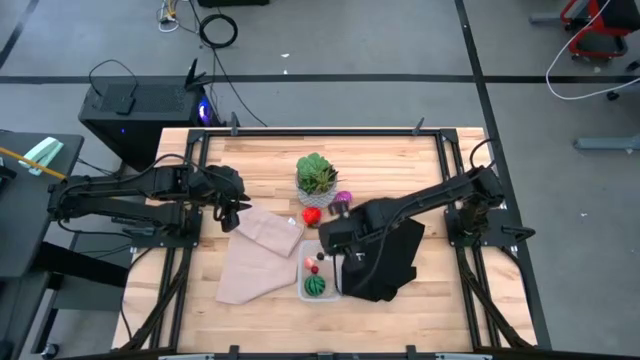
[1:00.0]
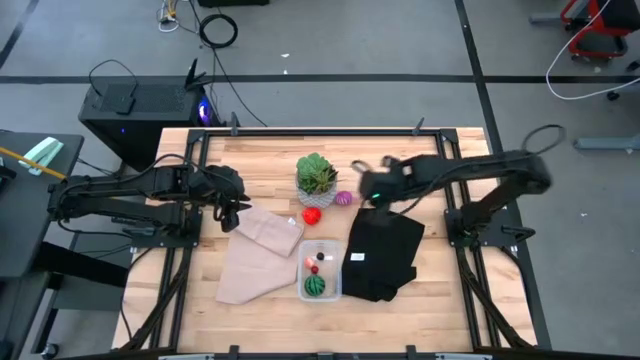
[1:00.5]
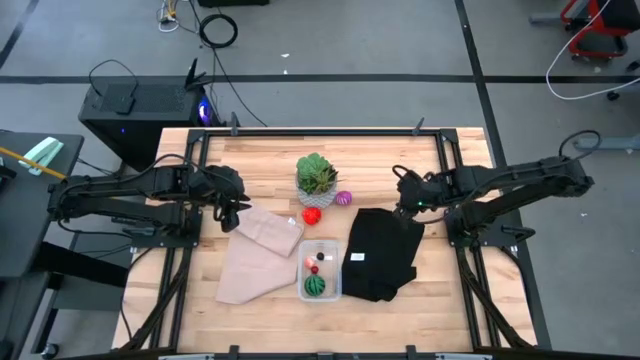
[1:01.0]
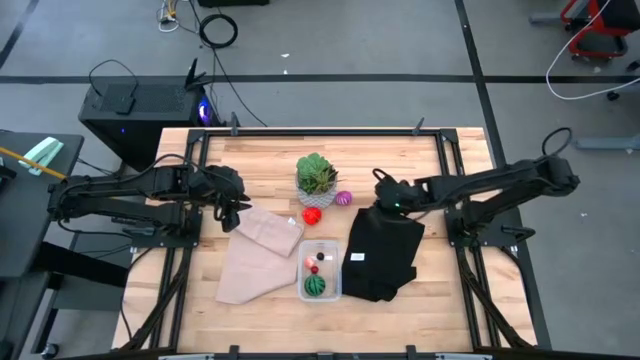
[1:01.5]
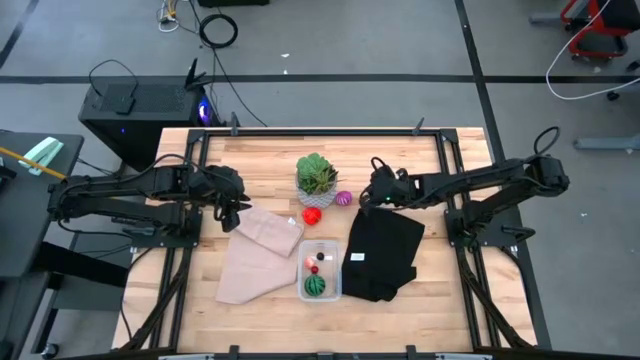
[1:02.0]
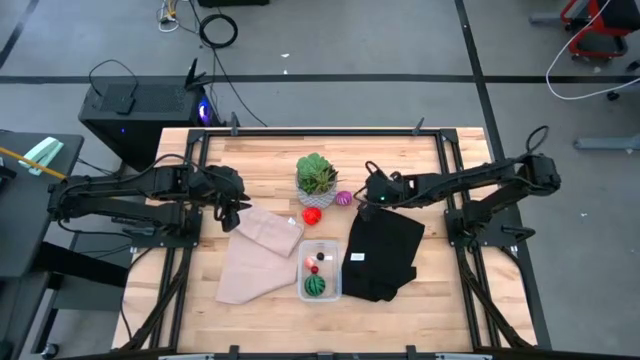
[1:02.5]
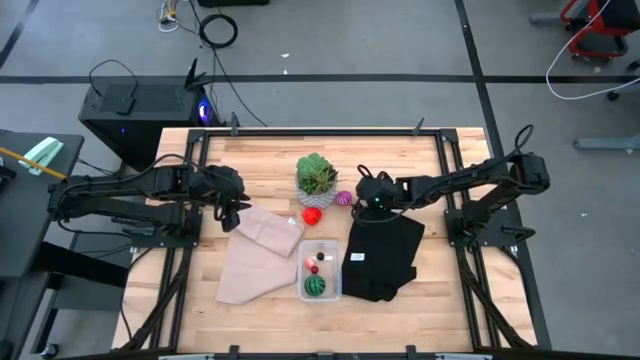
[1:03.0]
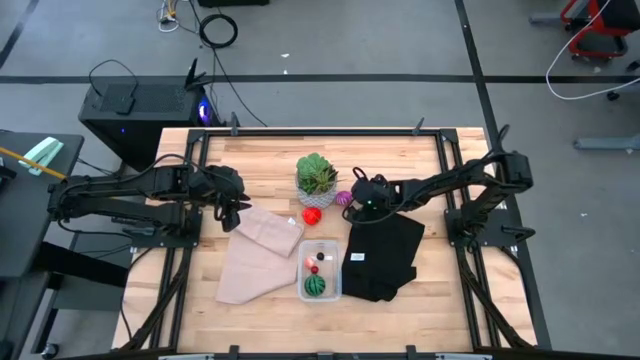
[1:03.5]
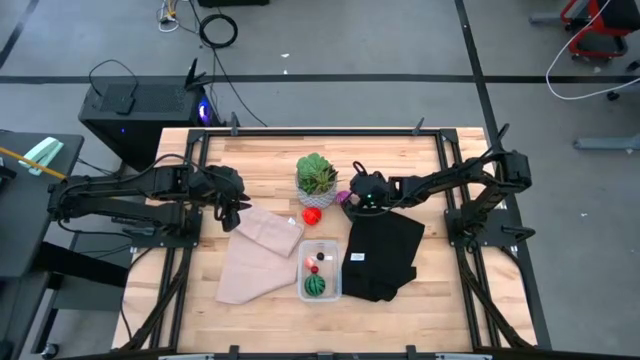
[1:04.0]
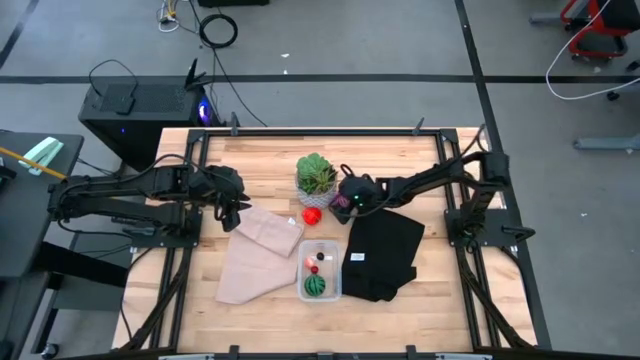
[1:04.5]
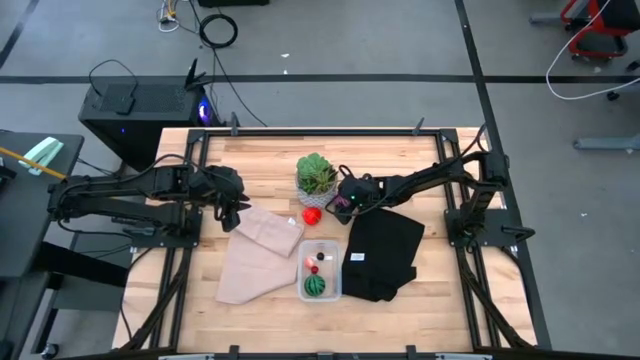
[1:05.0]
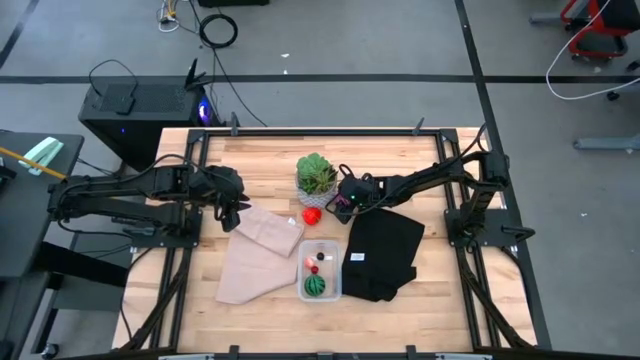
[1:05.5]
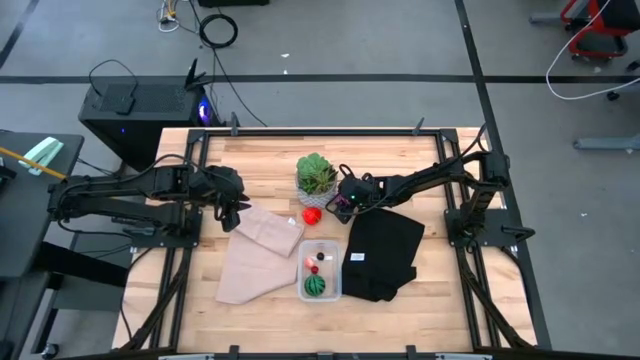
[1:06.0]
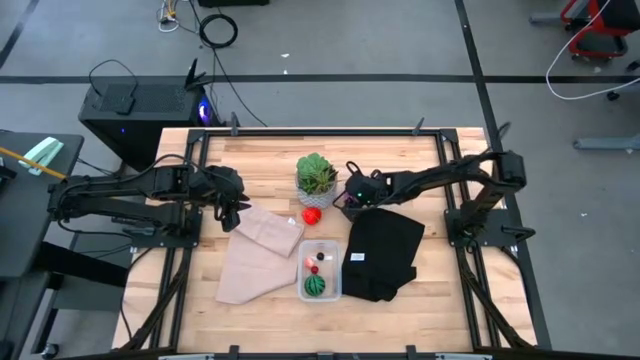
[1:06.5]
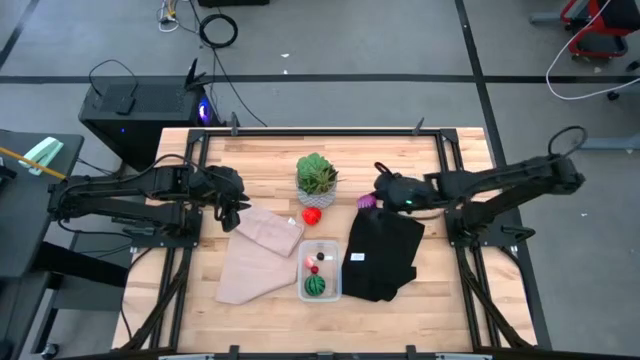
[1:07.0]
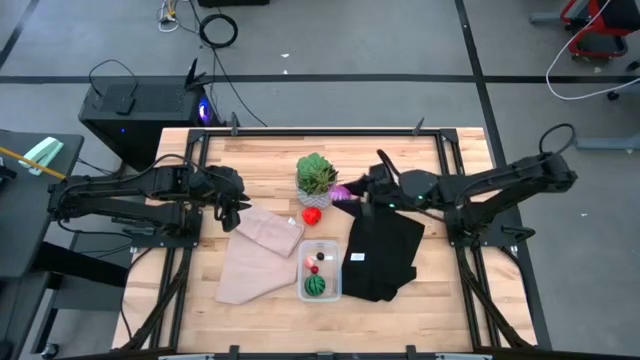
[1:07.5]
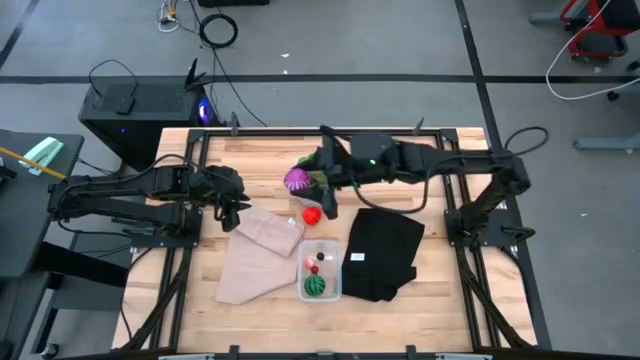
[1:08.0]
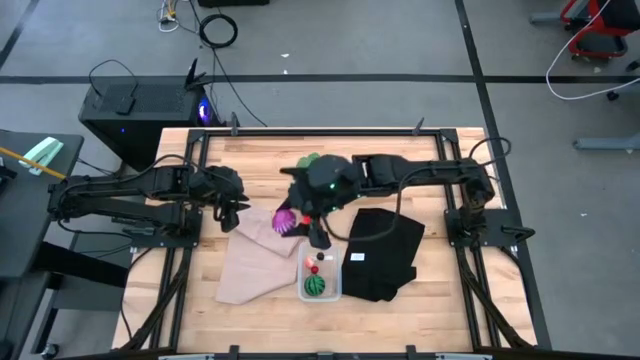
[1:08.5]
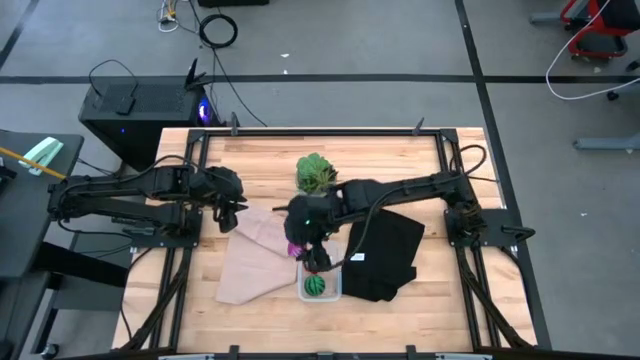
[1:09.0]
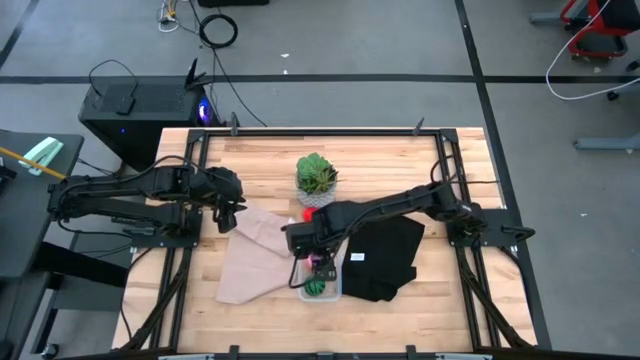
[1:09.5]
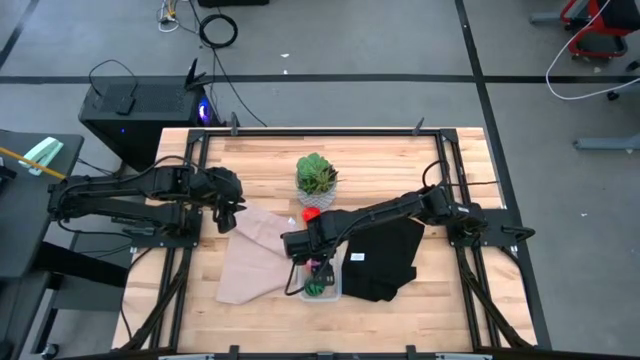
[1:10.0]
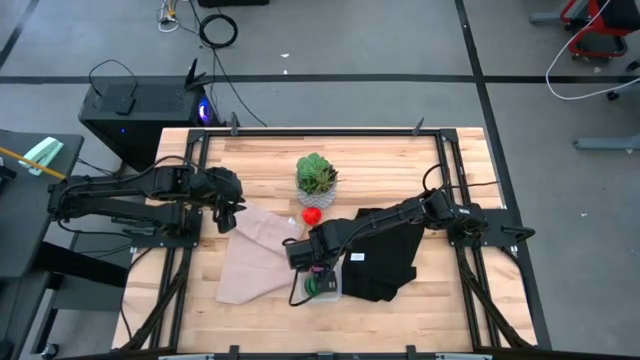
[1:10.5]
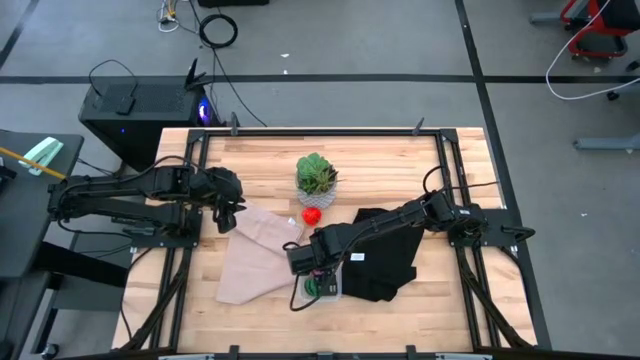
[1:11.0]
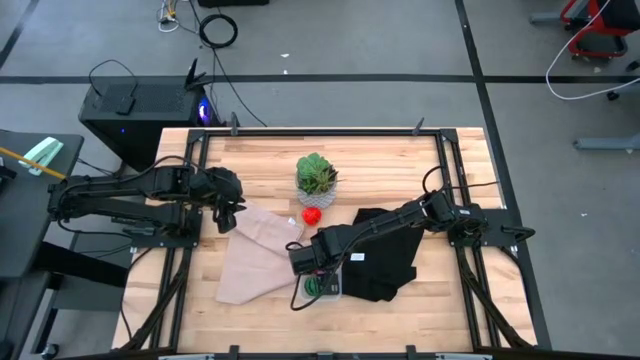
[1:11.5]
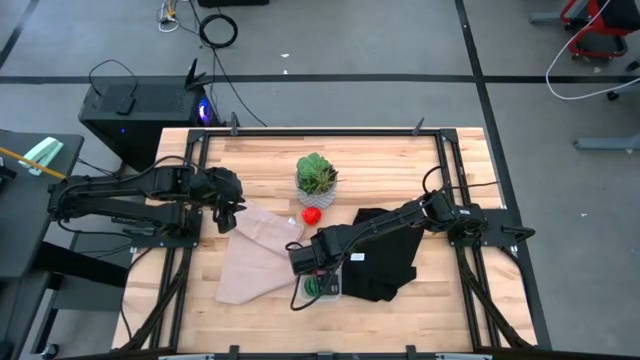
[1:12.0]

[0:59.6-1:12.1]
Task: Pick and placing Produce into tupperware
Put the purple onion into the transparent container

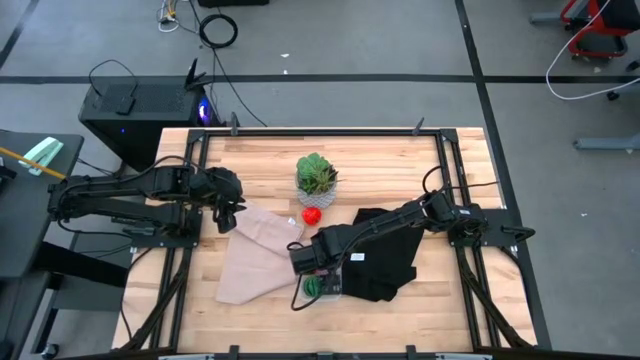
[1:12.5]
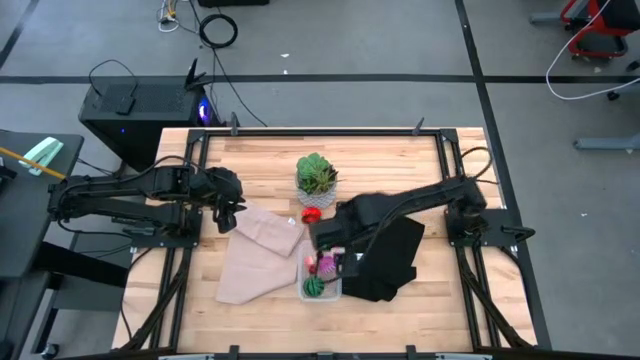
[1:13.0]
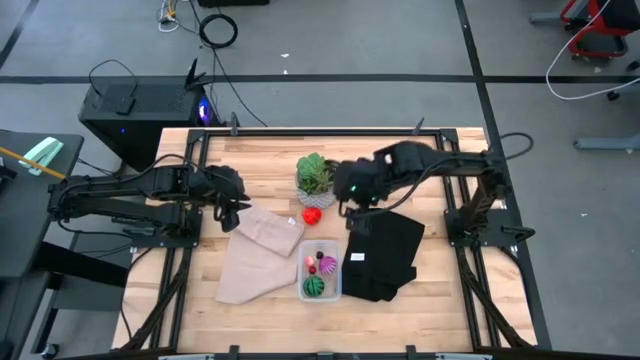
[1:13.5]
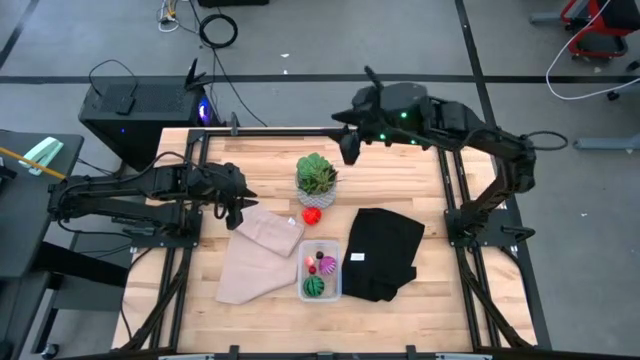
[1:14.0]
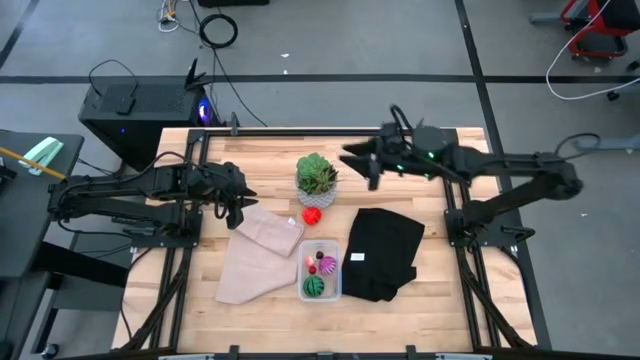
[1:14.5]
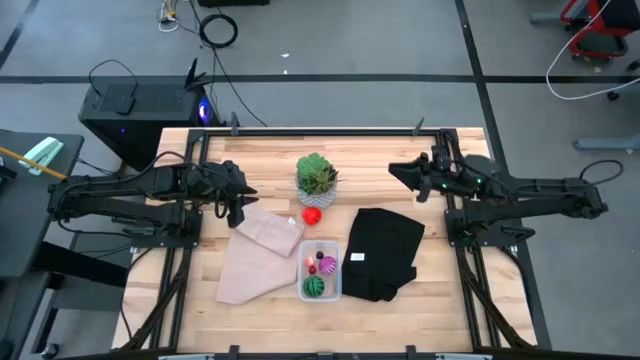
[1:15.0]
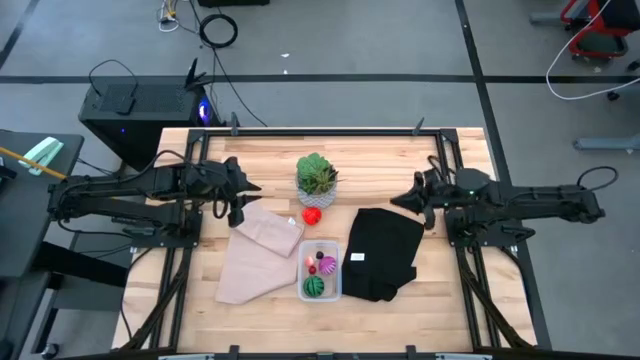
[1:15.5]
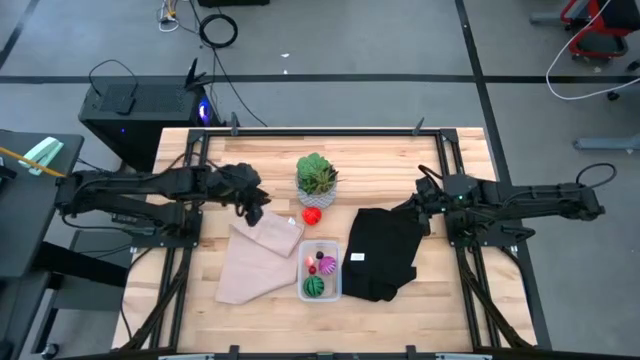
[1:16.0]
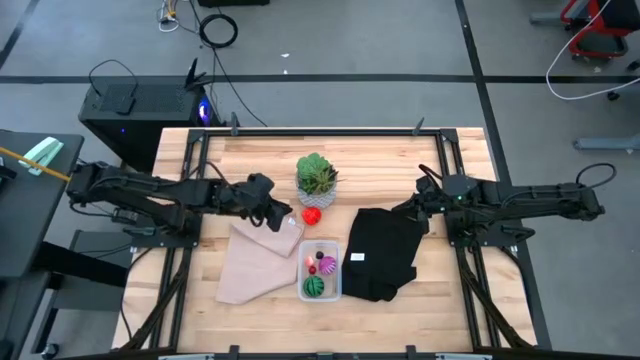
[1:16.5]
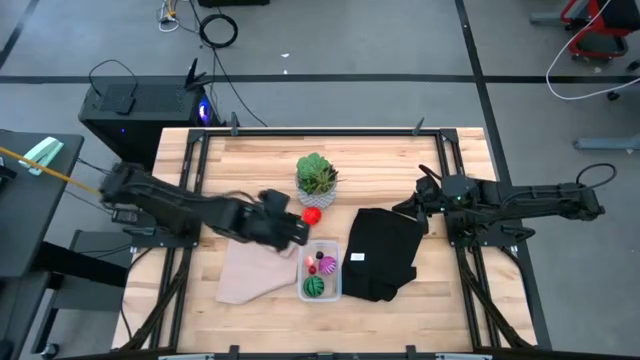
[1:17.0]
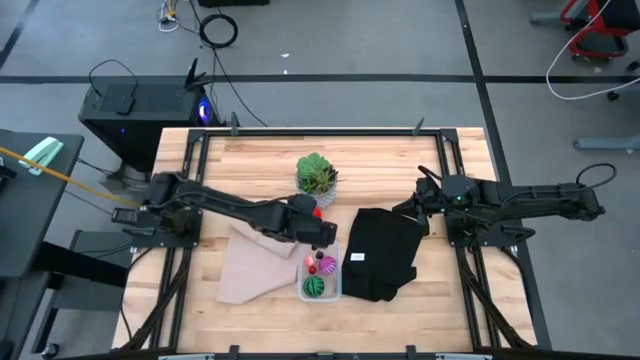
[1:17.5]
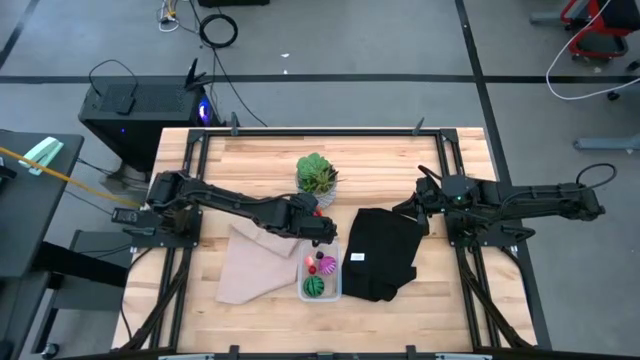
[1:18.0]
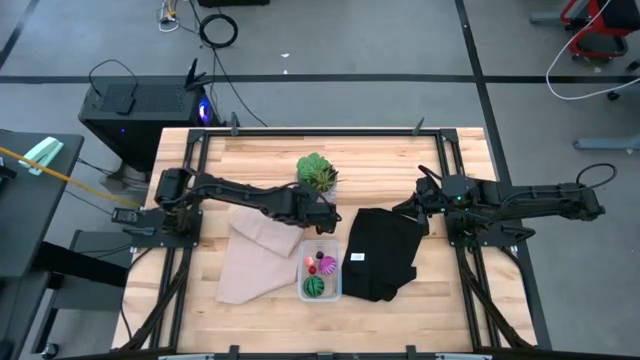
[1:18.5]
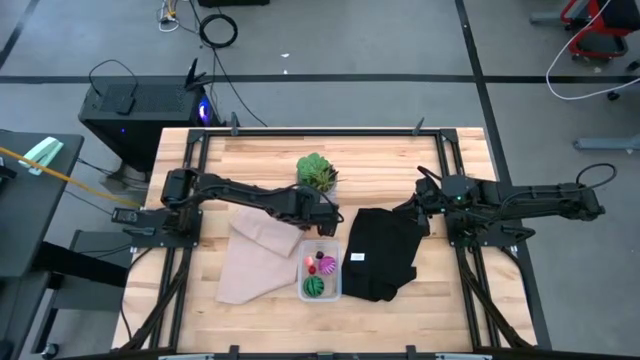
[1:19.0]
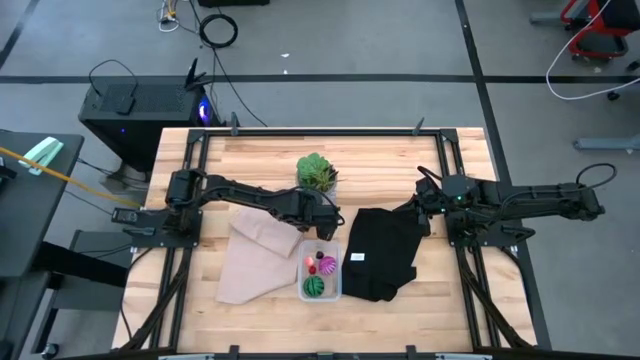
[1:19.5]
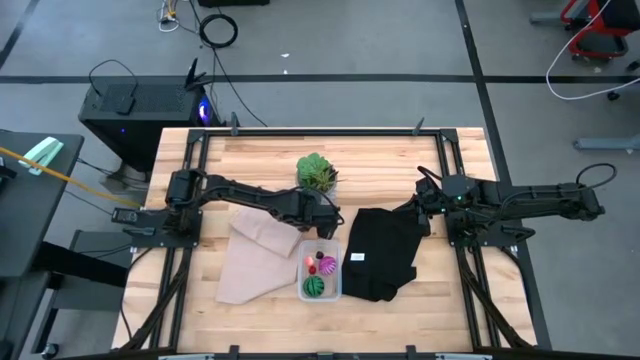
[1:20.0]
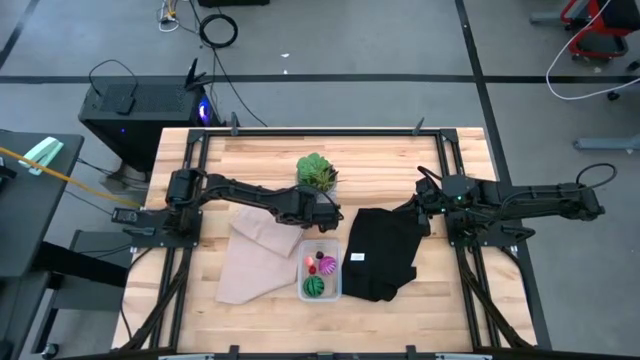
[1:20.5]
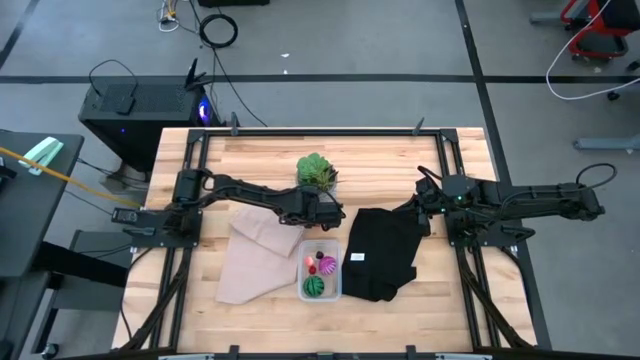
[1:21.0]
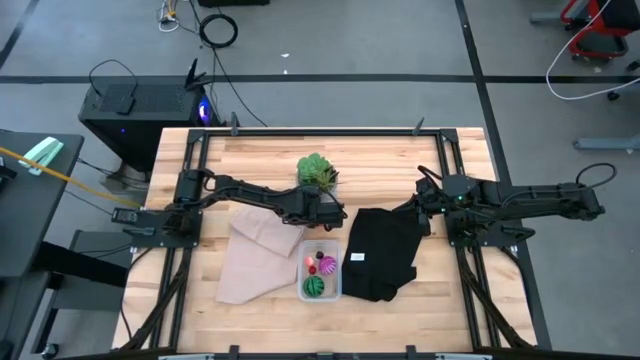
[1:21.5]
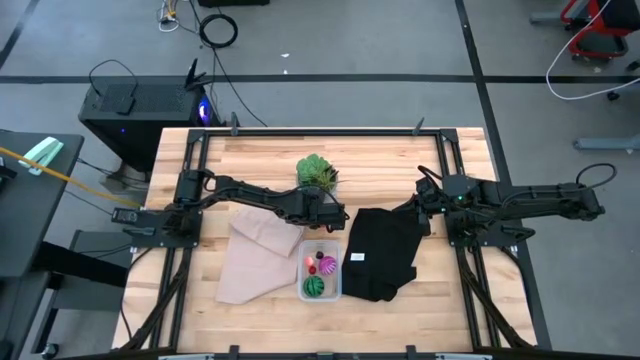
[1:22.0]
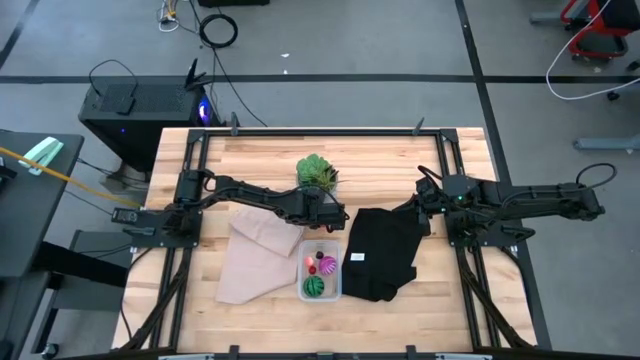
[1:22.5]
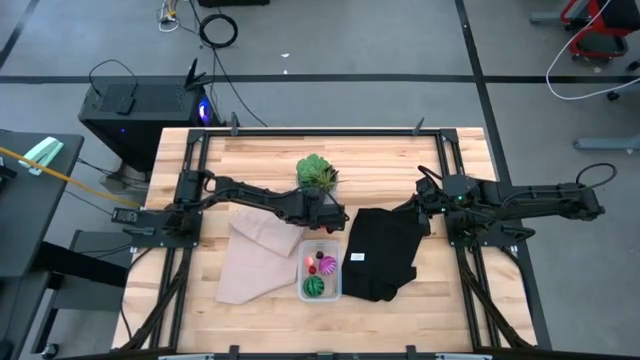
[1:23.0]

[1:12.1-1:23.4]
Put the red apple into the transparent container
